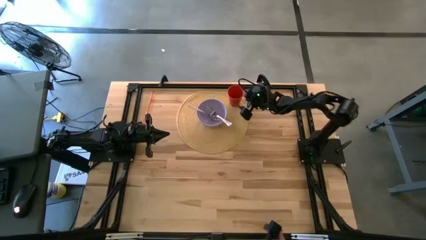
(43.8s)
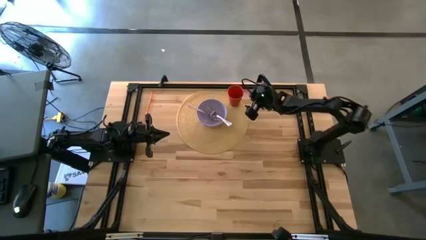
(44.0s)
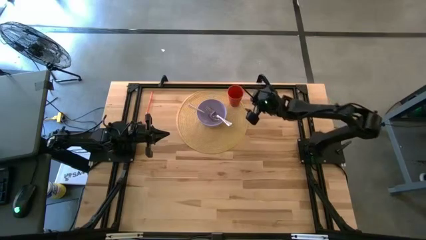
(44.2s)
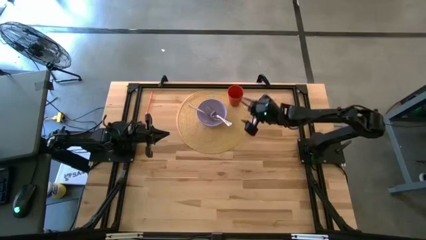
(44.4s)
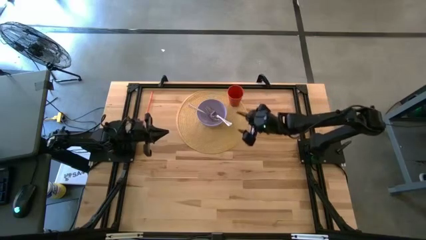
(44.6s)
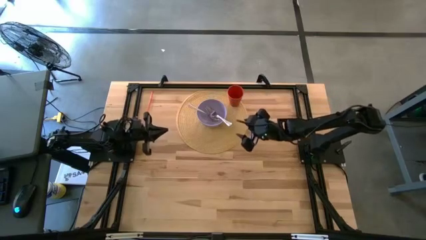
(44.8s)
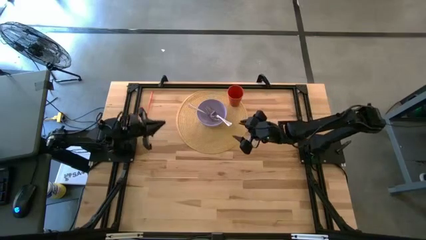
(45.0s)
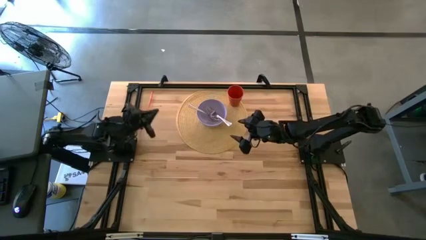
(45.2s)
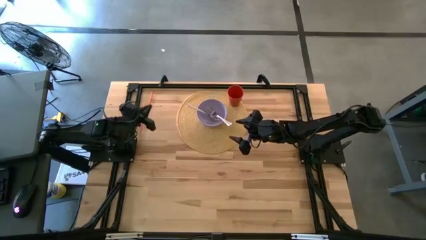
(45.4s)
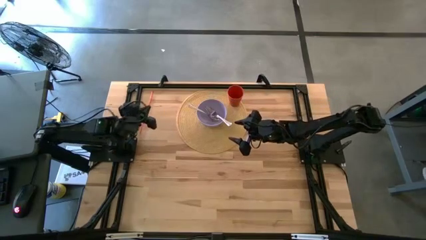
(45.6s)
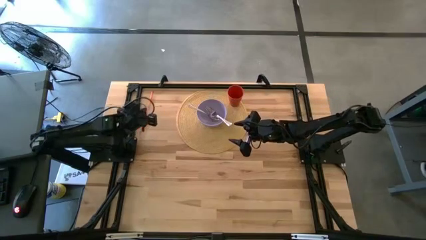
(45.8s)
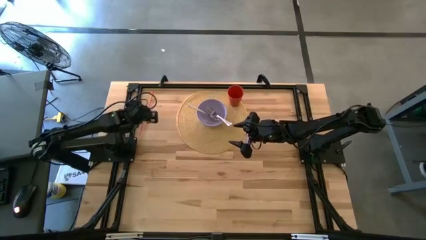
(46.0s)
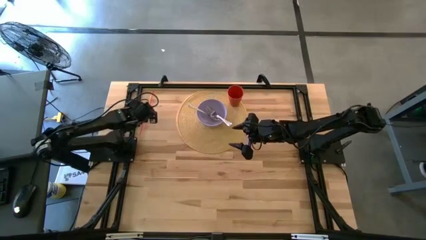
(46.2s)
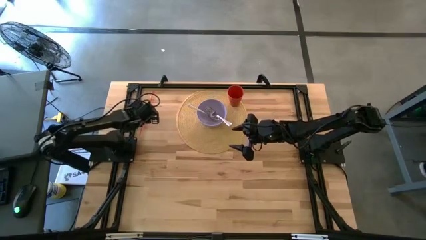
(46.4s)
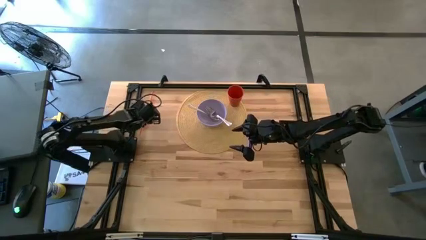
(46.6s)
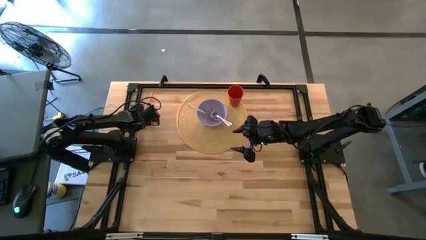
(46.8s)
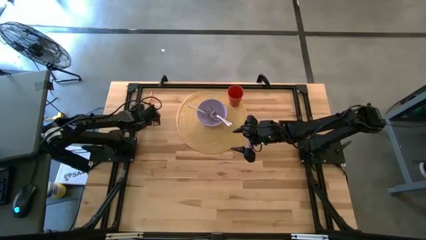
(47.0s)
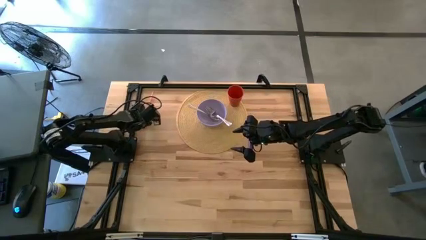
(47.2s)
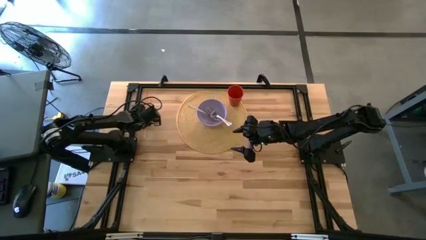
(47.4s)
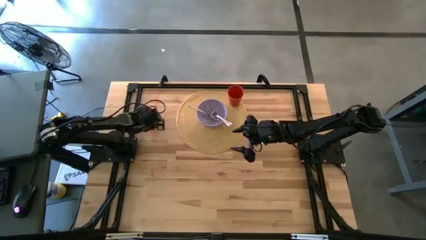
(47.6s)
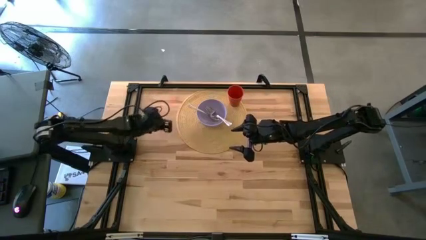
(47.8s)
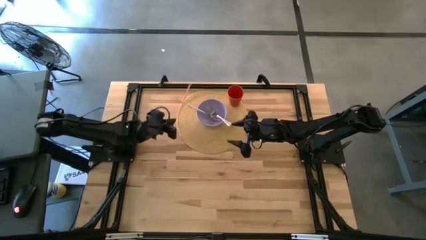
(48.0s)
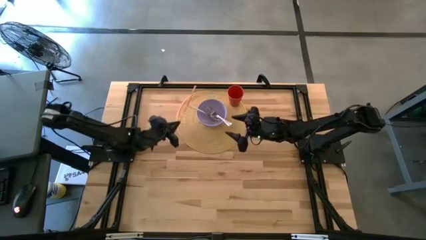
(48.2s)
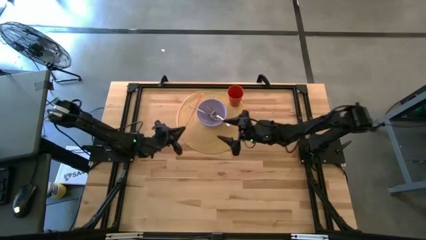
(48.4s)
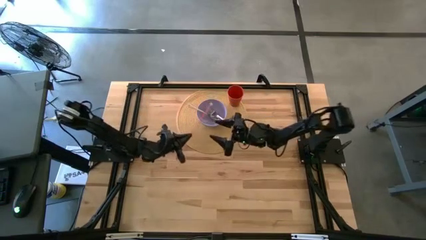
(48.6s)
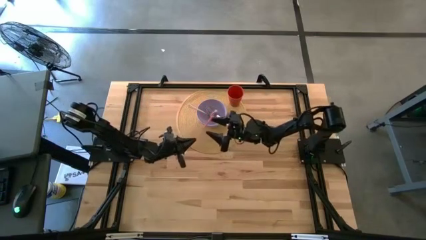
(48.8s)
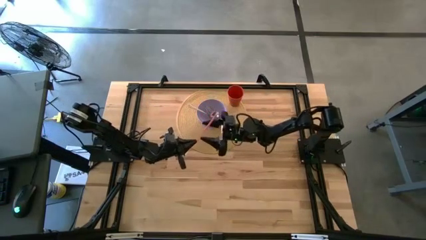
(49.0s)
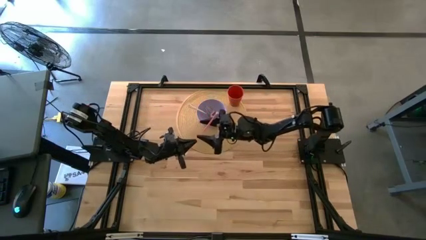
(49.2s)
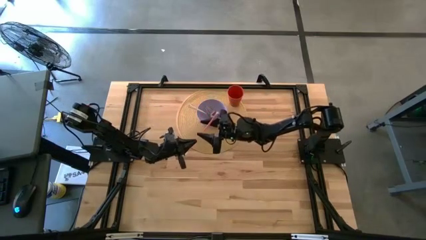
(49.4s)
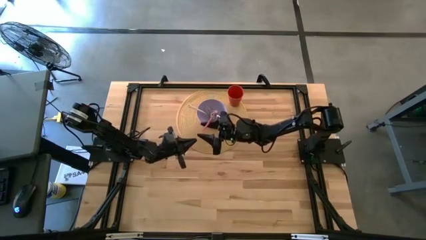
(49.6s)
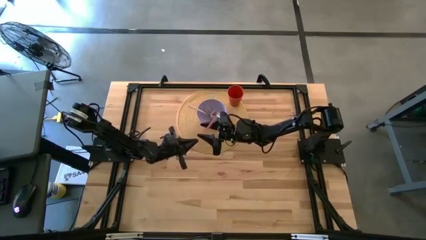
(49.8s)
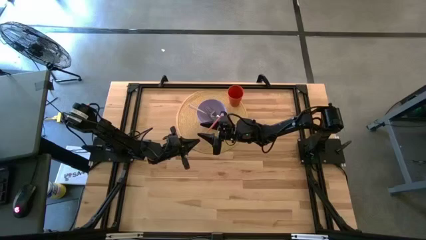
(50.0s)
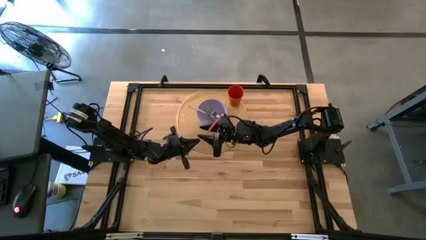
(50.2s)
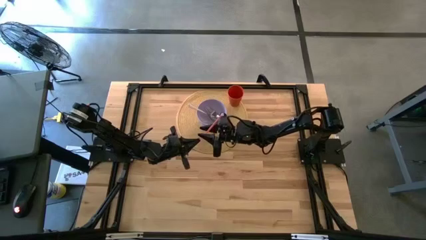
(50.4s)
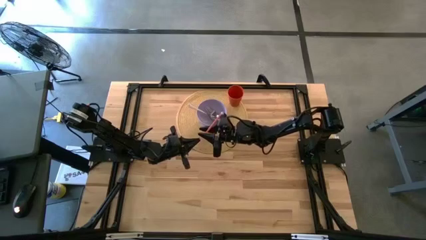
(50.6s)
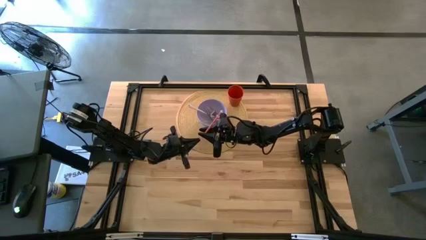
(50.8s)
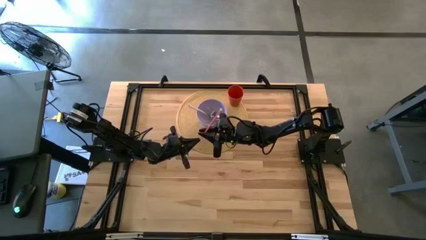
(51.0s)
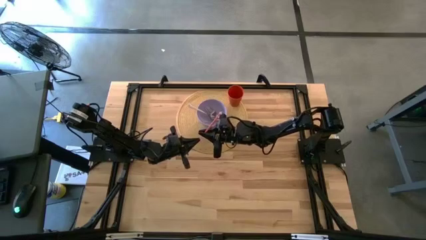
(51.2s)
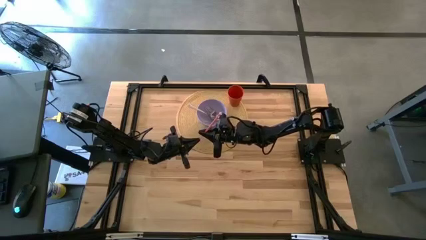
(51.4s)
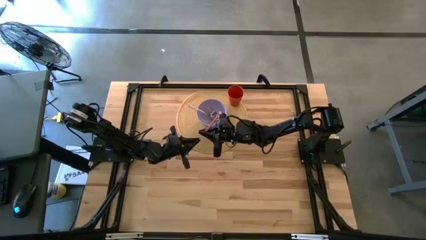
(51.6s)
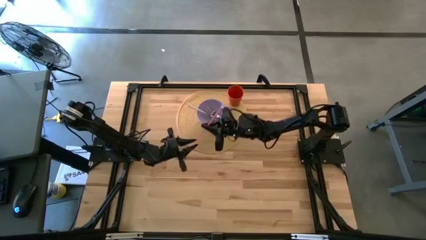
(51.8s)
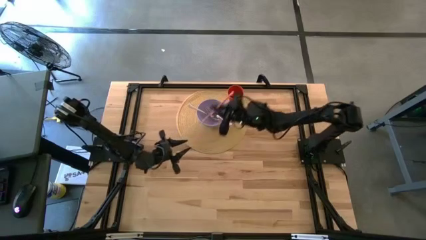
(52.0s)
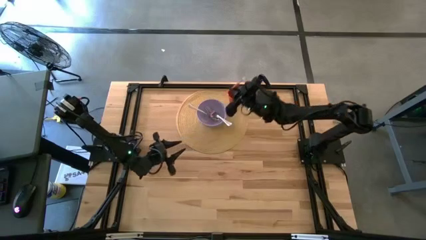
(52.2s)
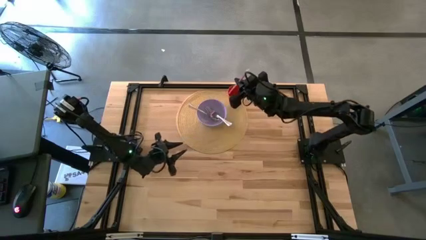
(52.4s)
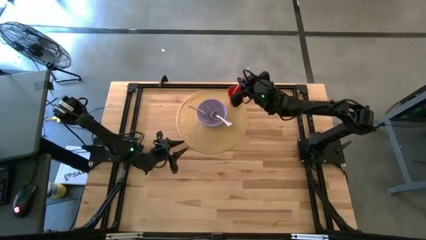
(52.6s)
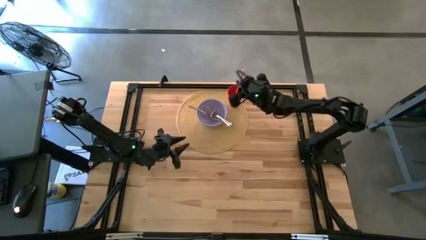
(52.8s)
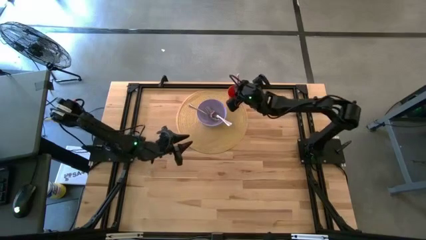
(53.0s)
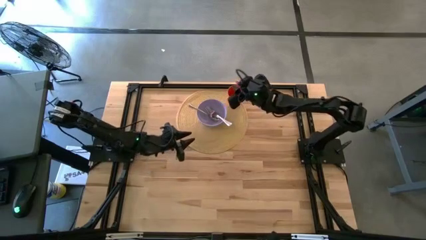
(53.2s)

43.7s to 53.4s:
Task: Pick & Place Utensil
Put the orange straw on the orange cup

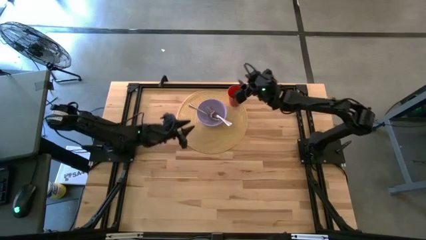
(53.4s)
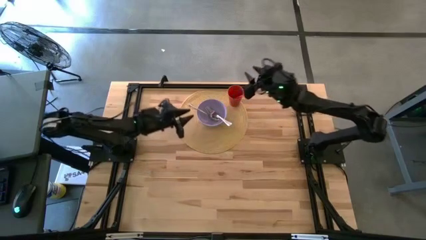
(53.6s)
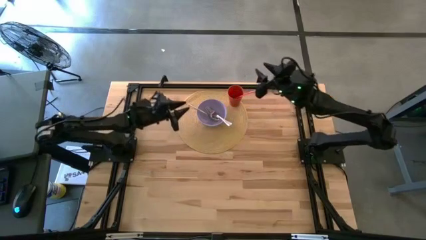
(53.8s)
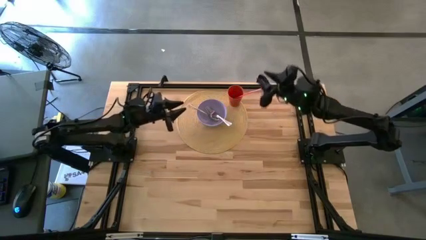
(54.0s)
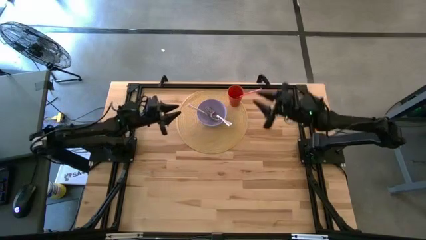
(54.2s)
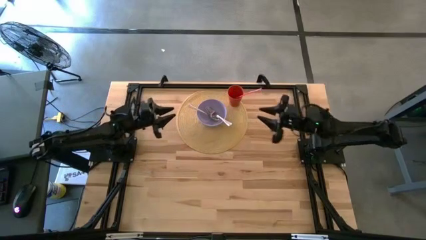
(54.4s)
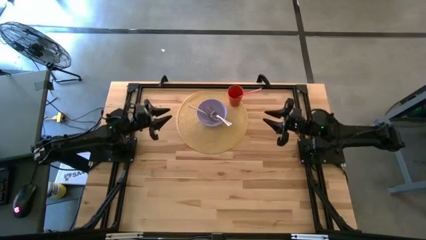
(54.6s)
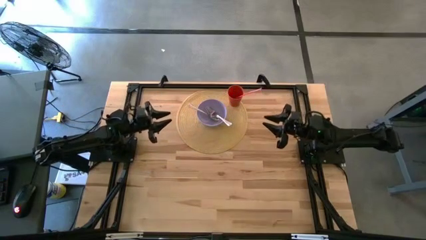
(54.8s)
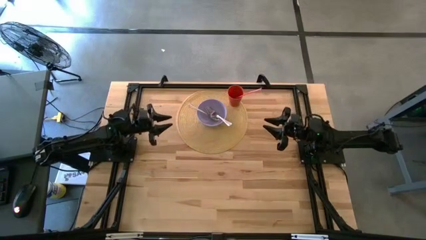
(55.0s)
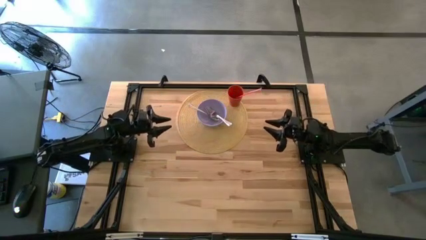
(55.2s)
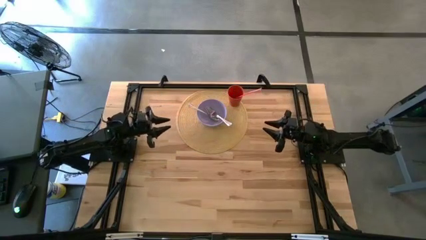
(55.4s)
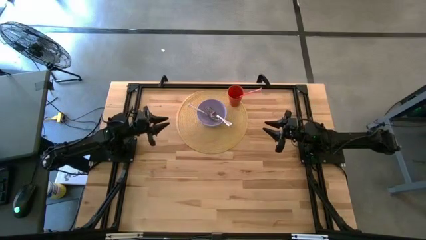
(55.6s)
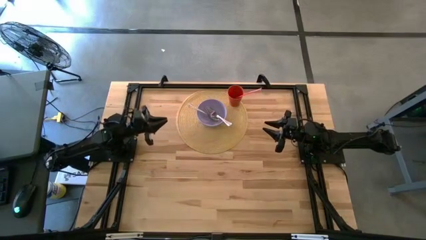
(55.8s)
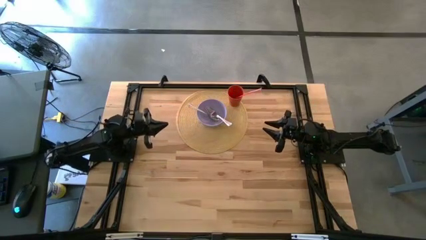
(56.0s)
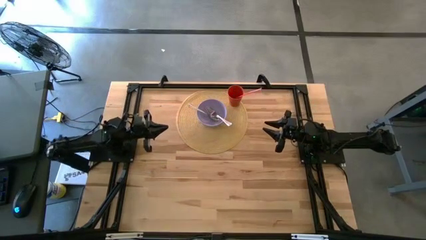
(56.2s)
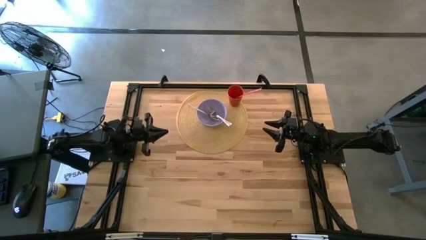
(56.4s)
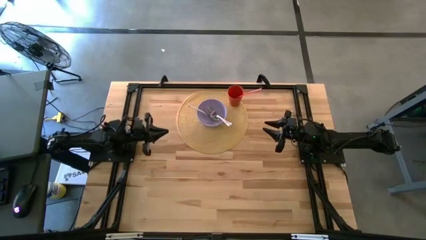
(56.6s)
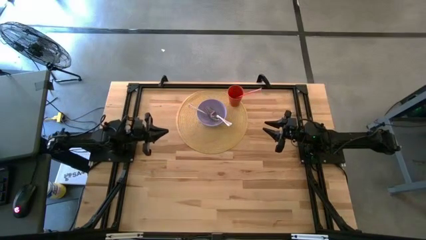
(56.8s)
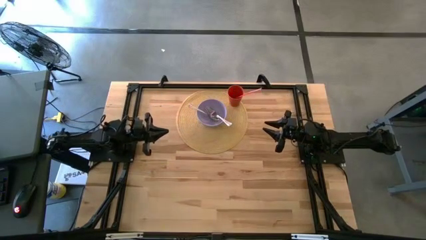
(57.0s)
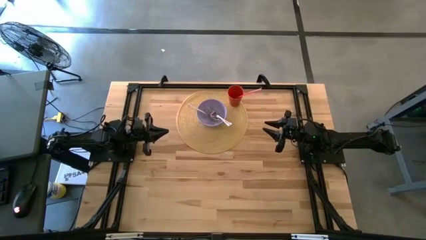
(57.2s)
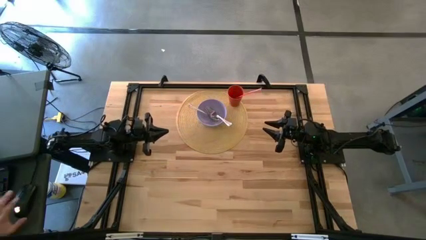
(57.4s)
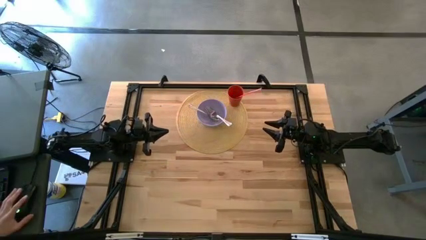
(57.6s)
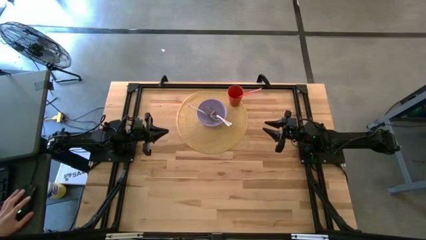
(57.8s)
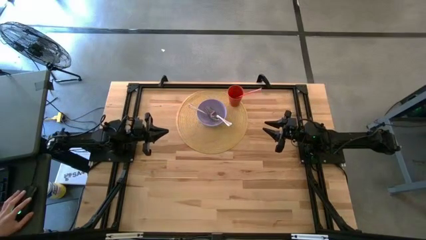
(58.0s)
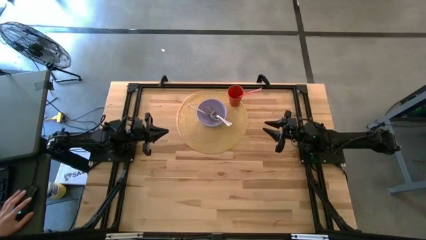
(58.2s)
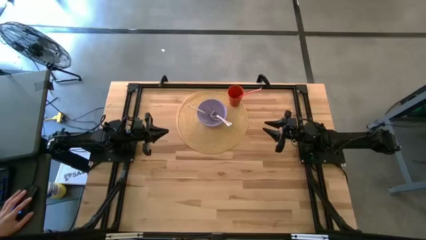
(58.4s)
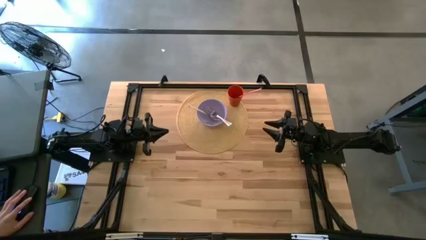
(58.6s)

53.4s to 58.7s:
Return to Home Position

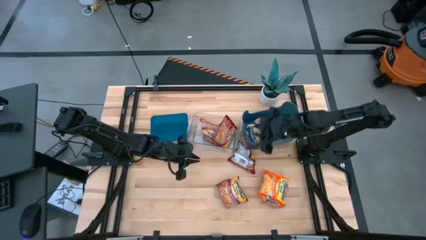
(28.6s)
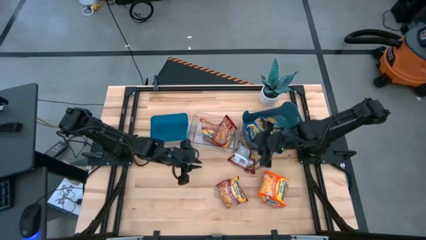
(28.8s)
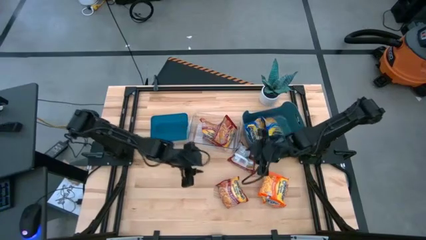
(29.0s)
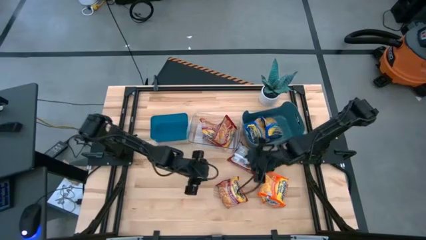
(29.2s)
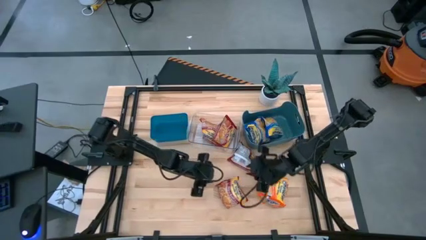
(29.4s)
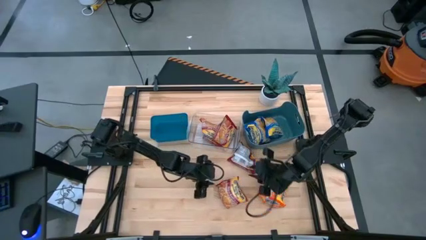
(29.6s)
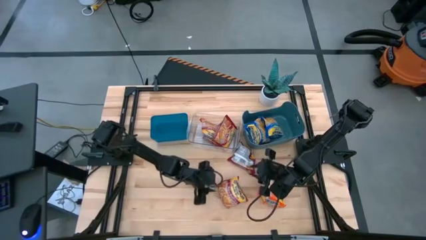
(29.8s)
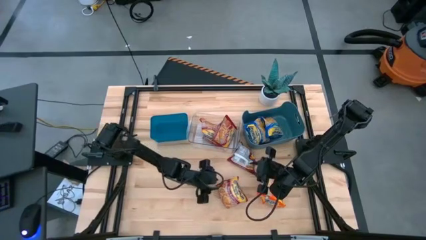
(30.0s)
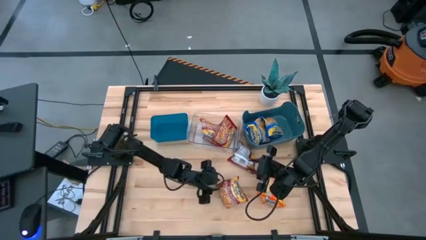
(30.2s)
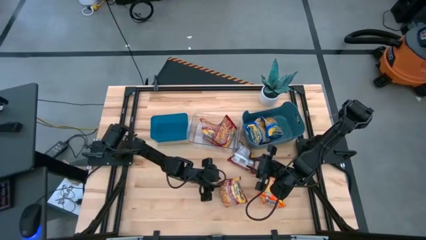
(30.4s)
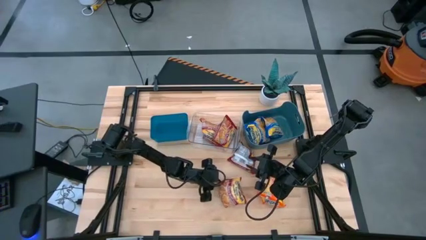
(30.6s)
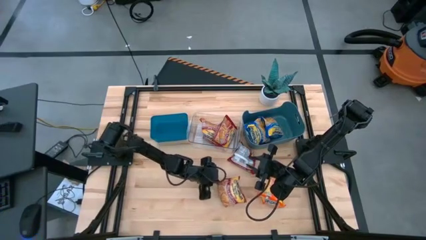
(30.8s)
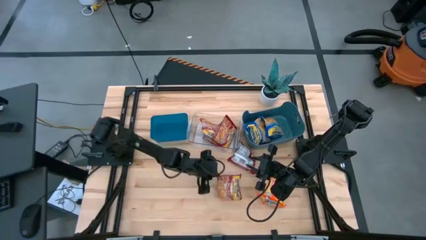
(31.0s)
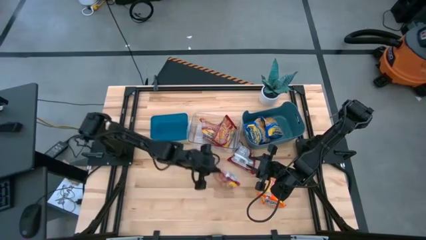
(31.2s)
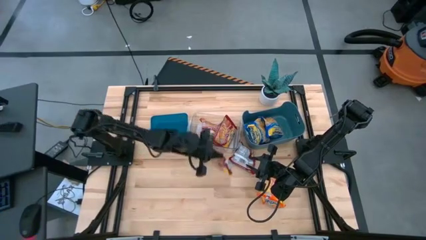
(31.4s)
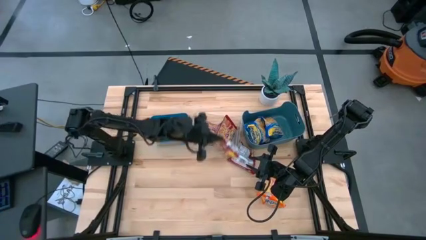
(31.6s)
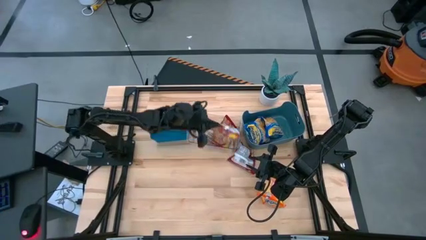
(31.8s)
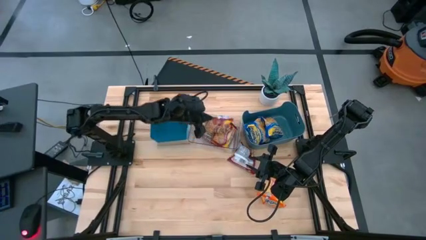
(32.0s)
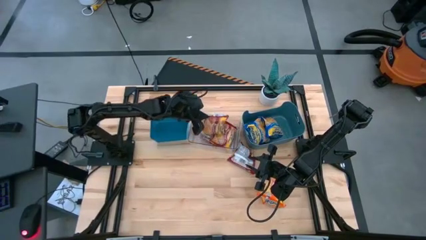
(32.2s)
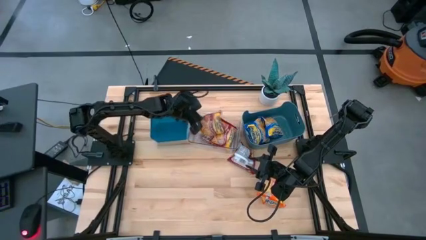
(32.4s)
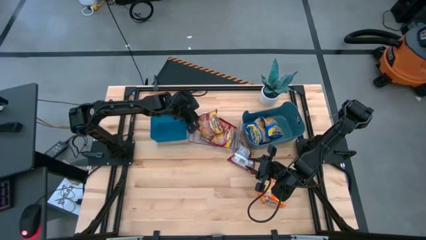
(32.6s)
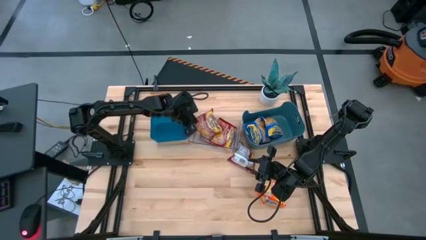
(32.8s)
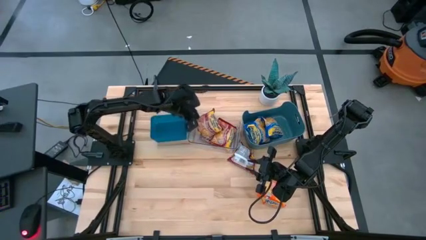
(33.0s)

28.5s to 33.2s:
Task: Sort Maruchan noodles
Put the red noodle pack into the transparent bin
